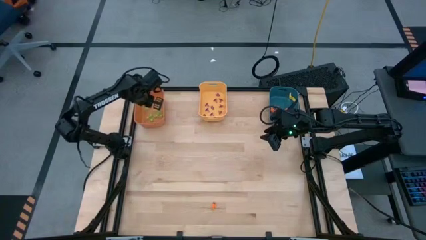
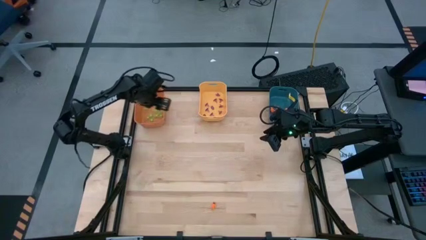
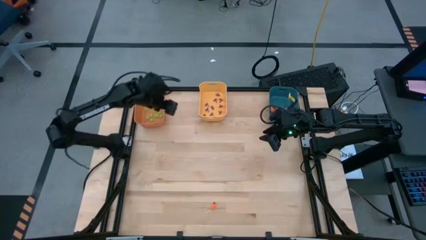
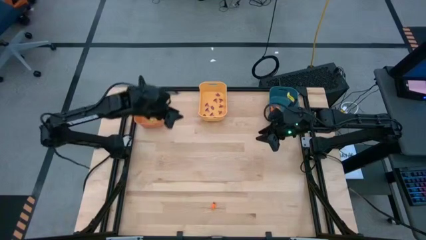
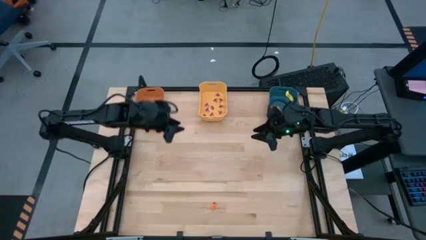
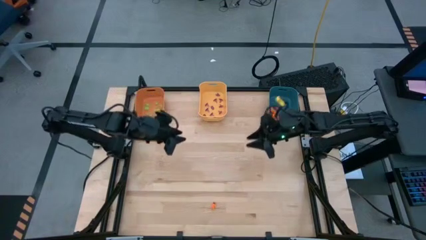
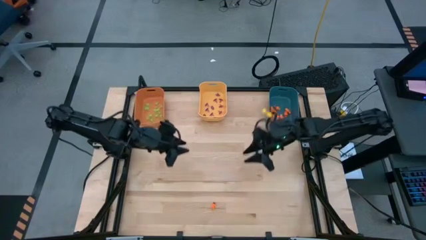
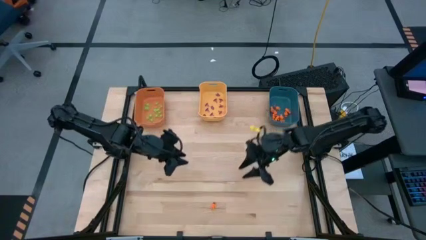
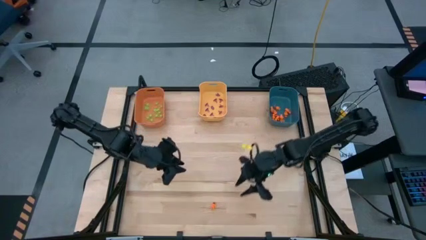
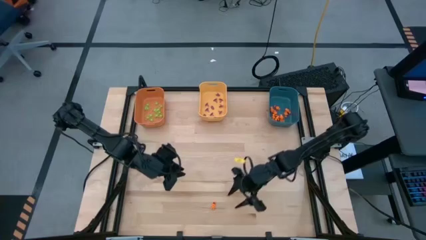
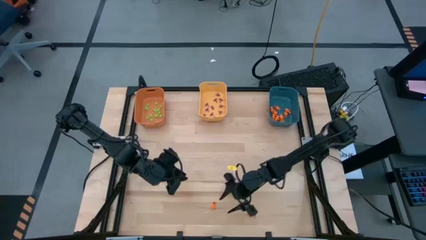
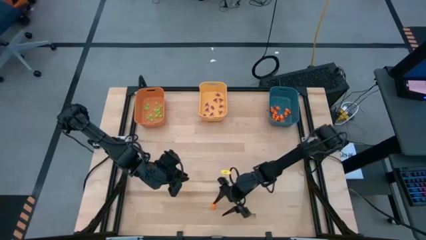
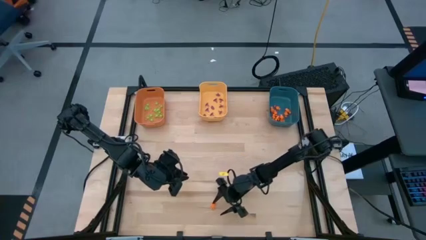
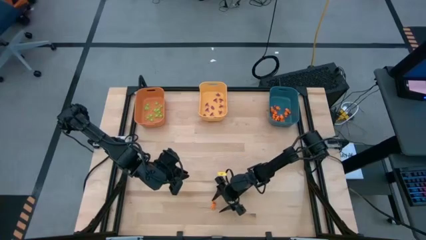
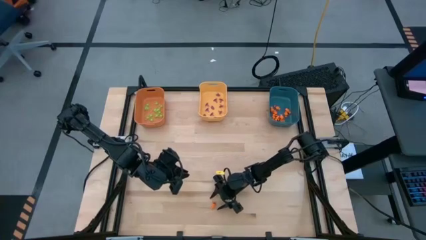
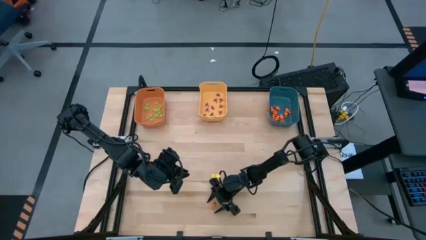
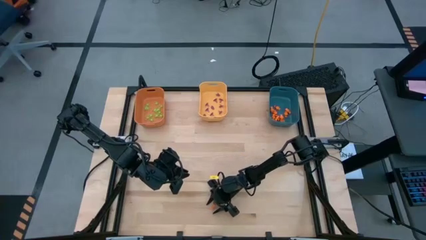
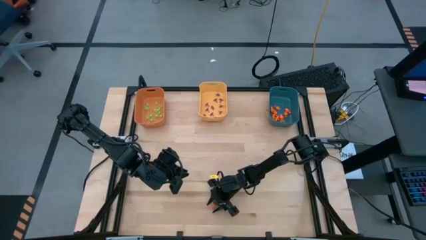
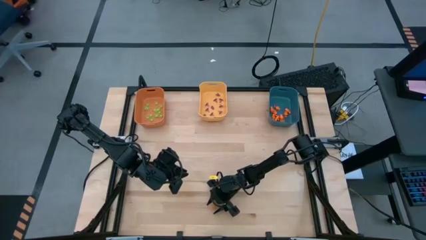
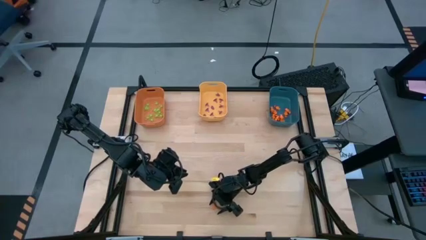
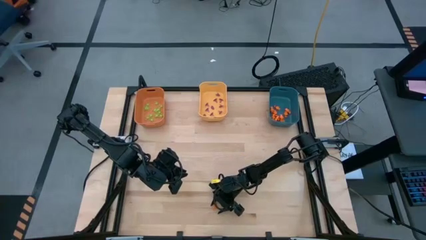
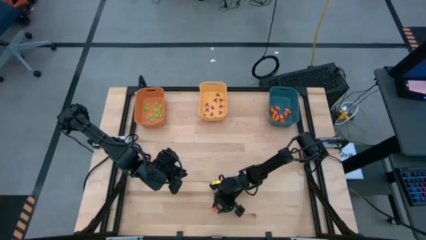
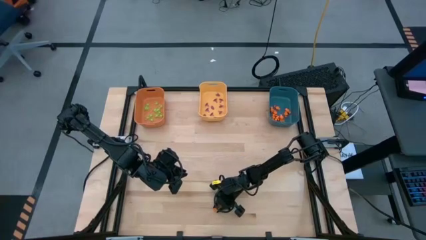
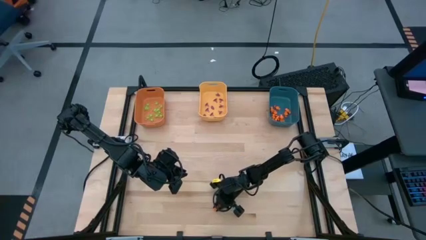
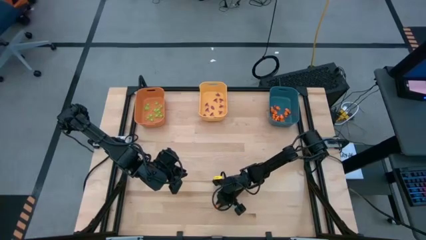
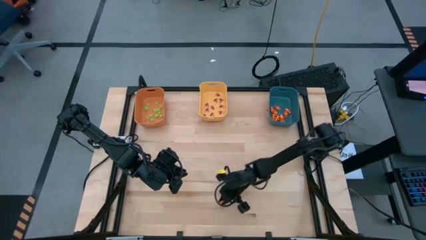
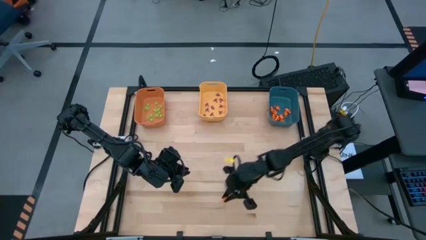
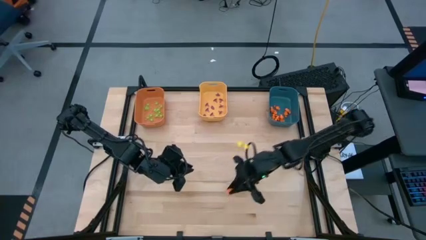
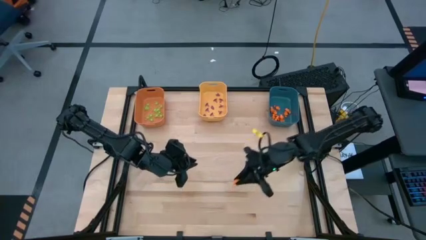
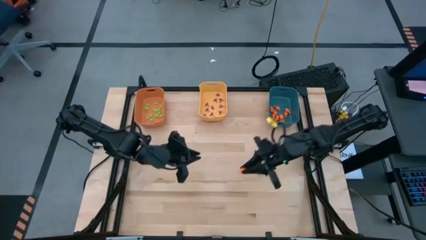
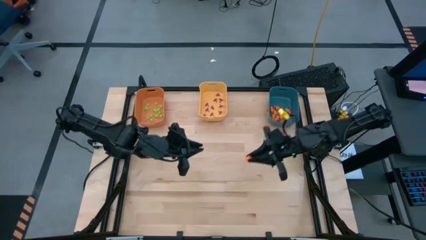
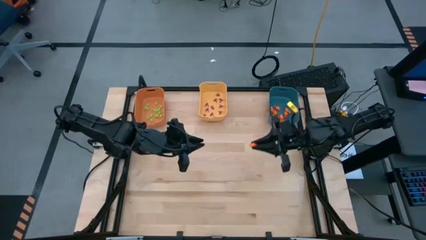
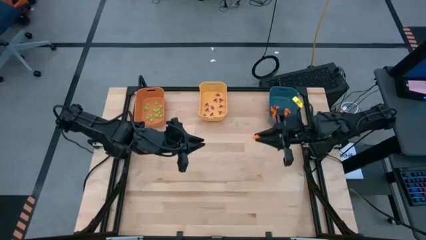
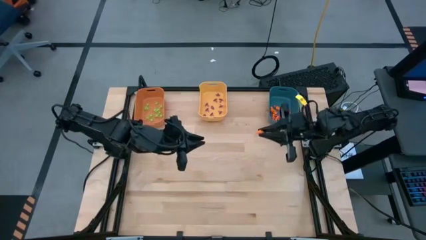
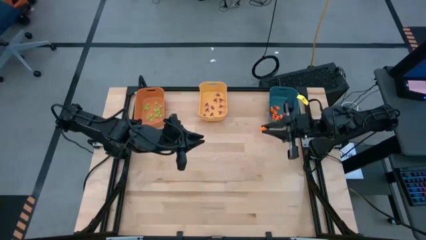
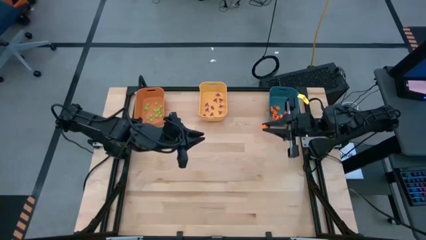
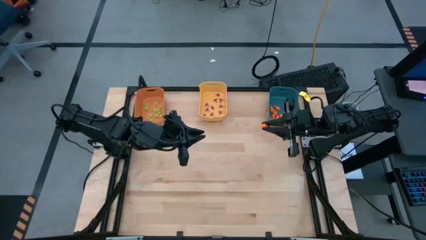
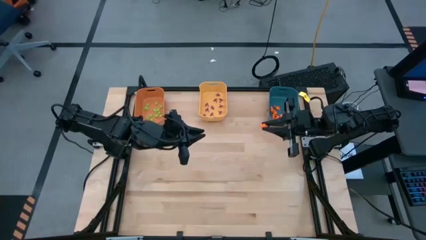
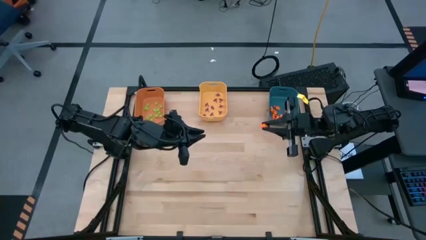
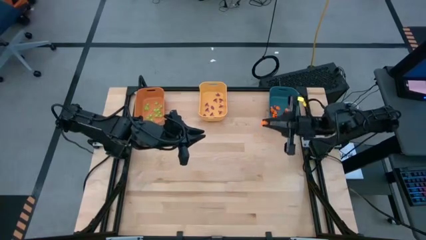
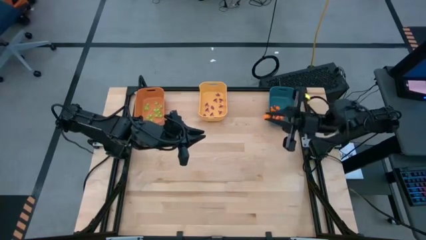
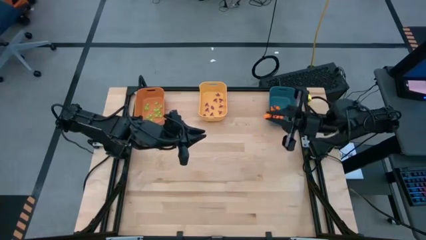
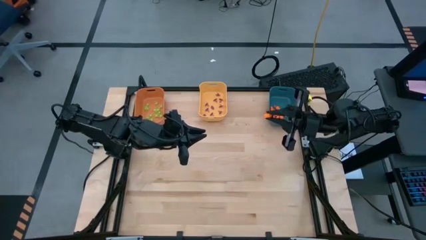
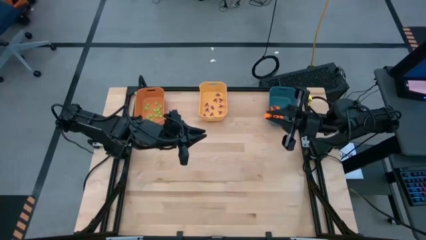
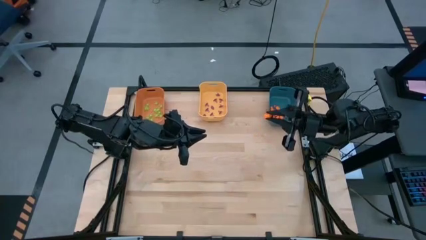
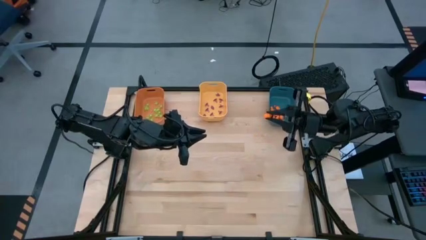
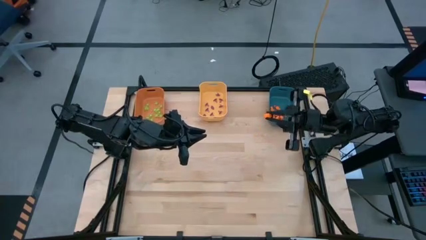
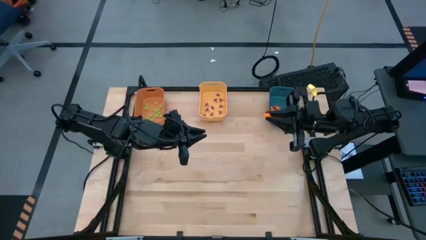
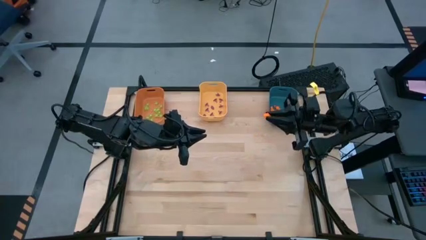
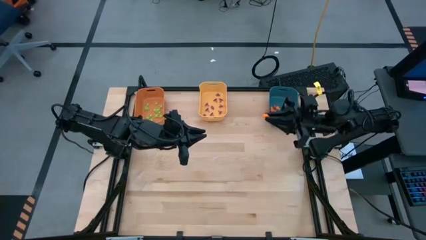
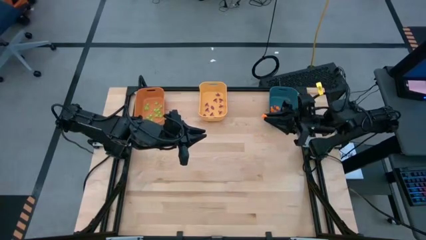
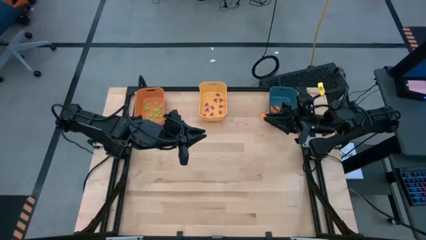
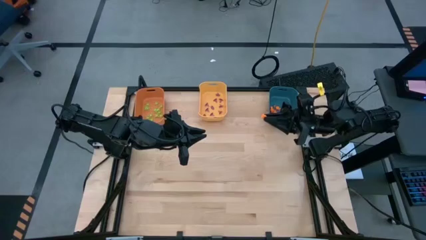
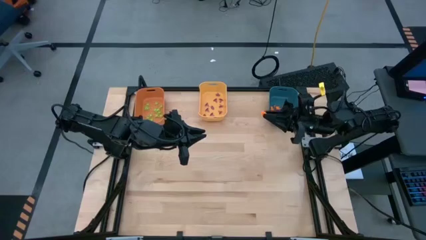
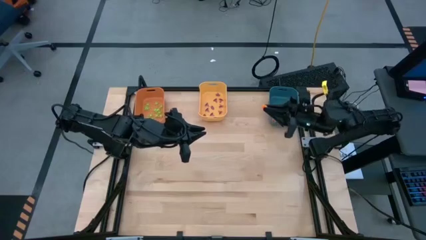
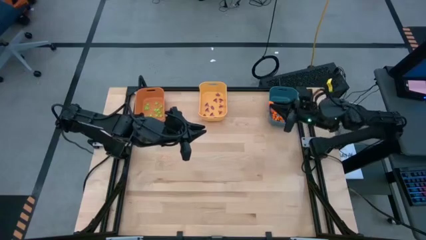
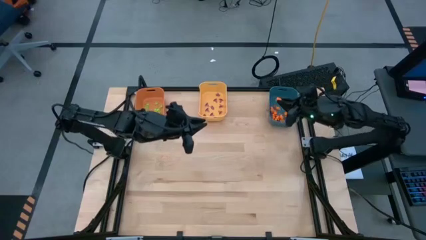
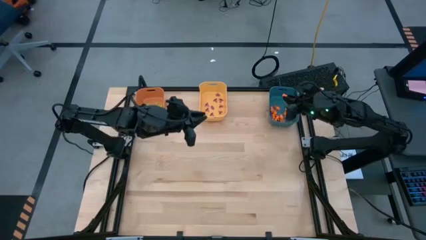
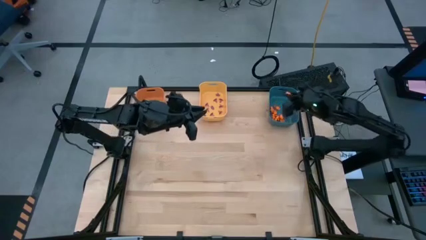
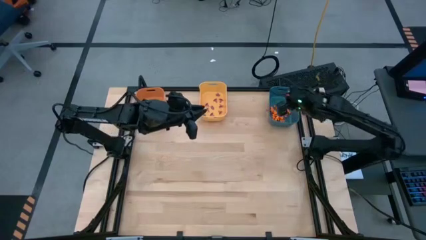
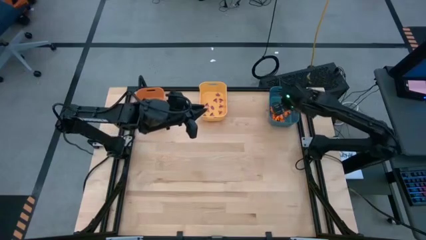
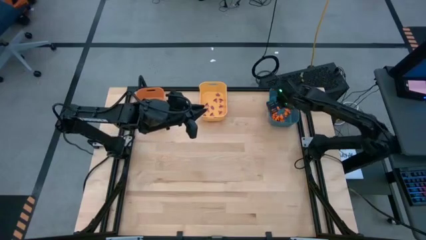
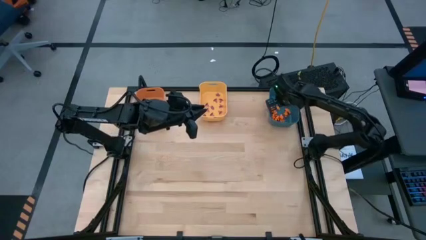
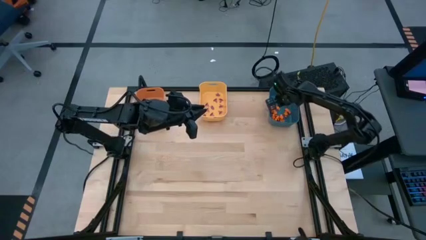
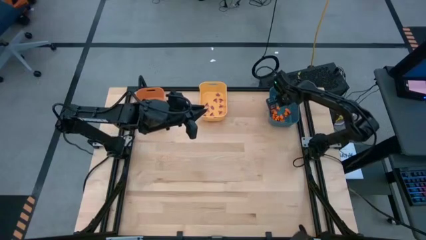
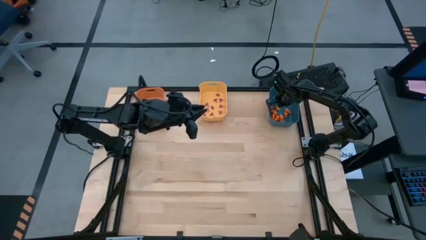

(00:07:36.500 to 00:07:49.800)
Task: Sort Halloween decoration
Put the orange skeleton toy into the blue bin

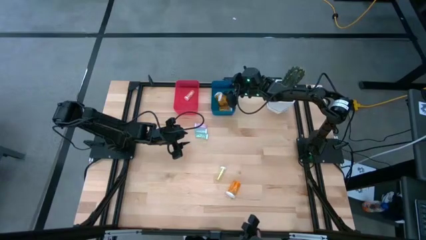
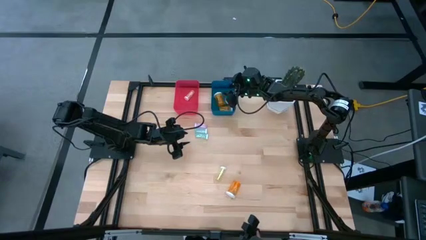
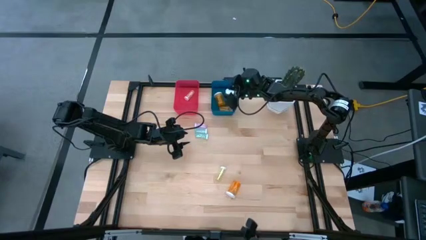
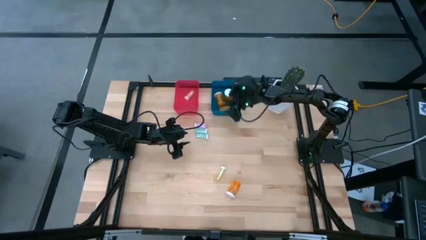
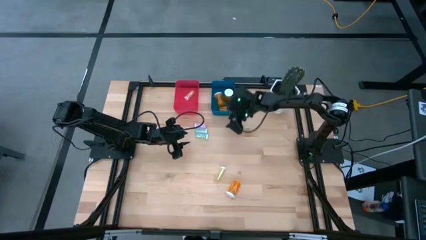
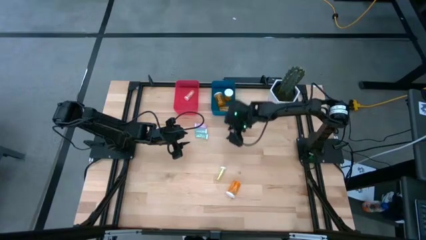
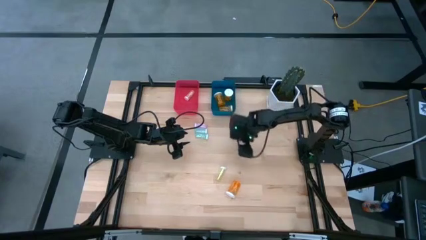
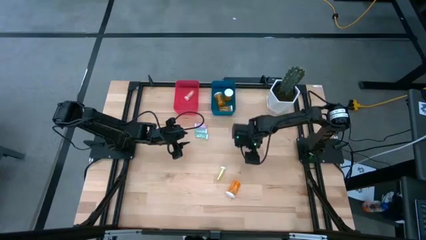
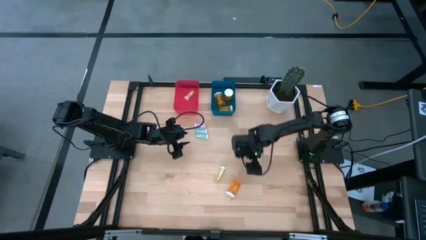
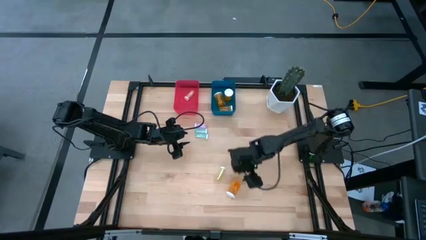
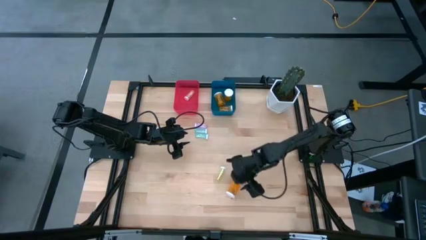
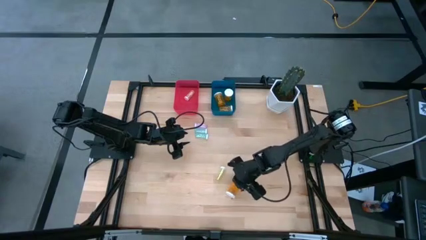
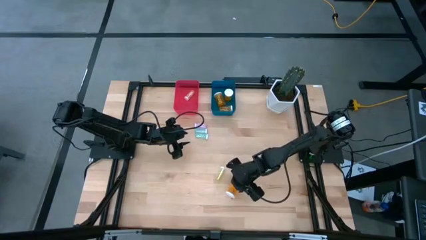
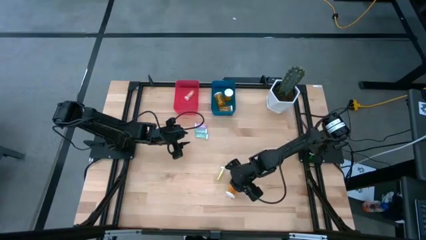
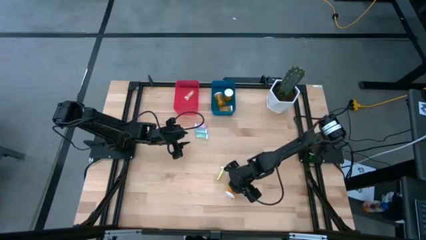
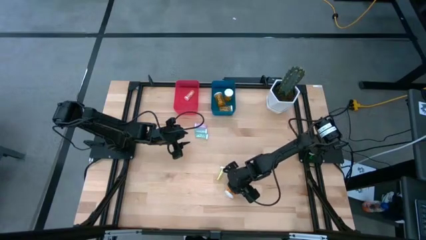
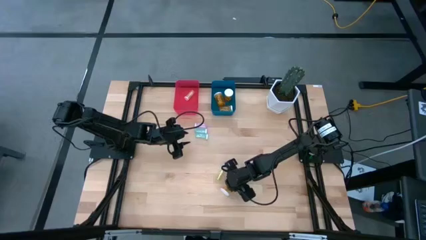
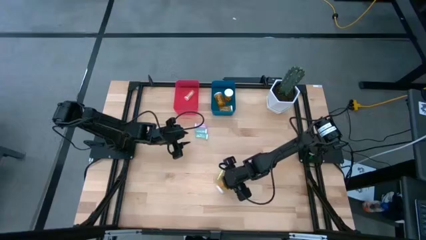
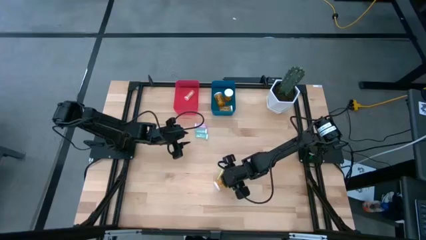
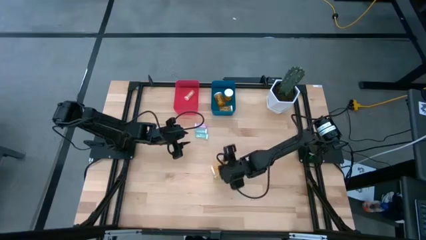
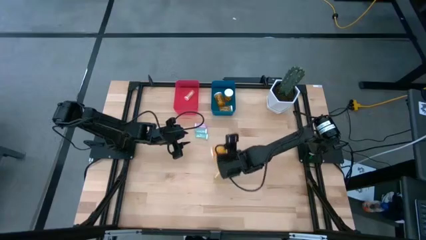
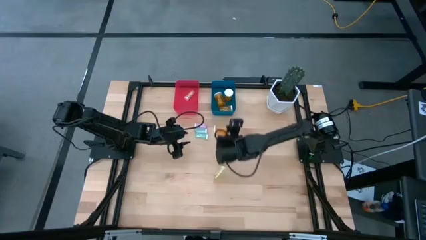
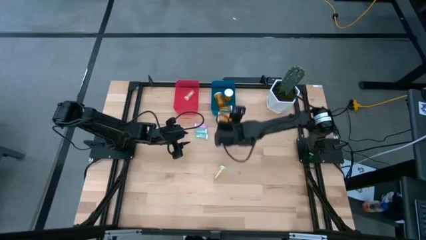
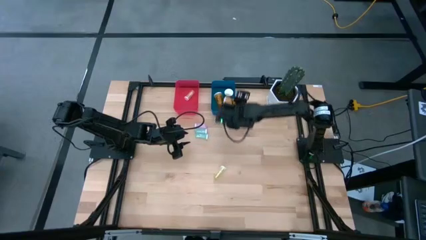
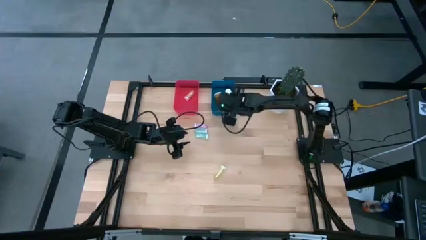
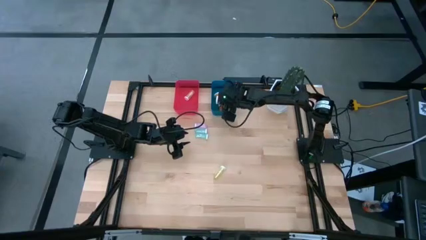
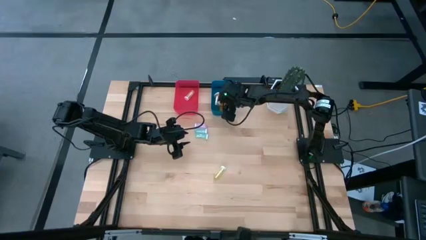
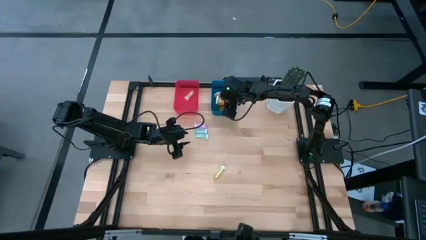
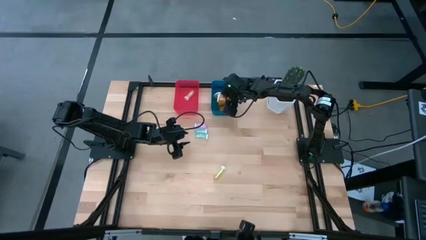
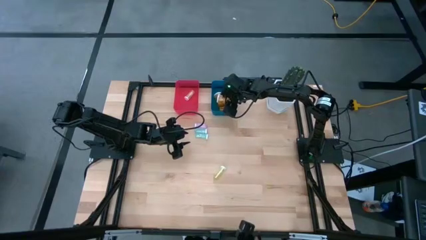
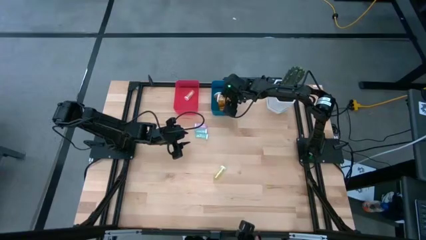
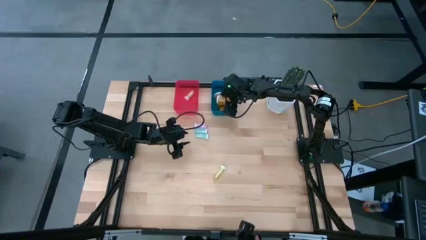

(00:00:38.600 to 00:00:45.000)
Task: Pick and place medicine bottles into bin by pill shape (circle, oval)
Put the orange capsule bottle into the blue bin
